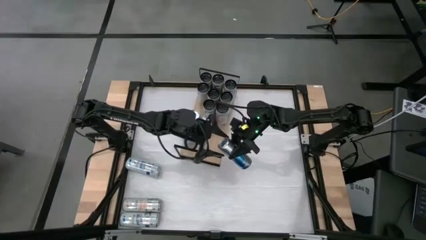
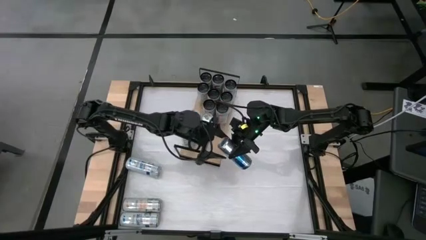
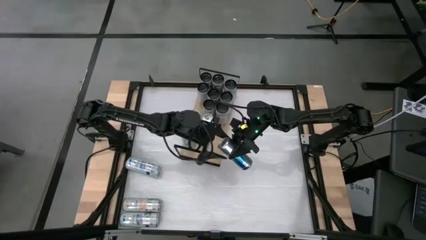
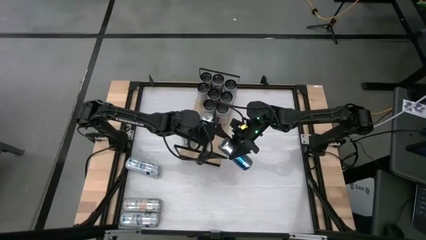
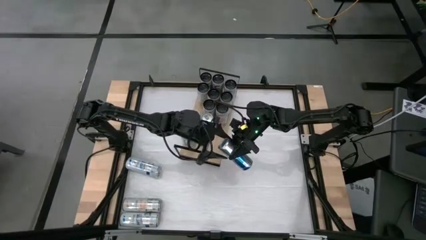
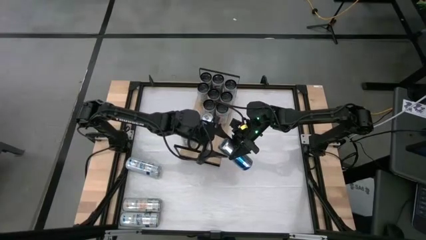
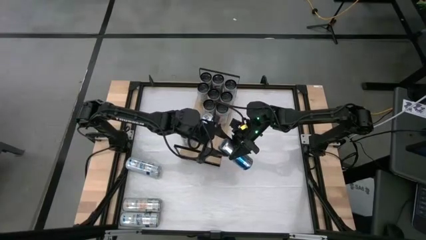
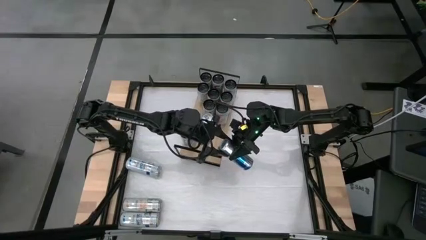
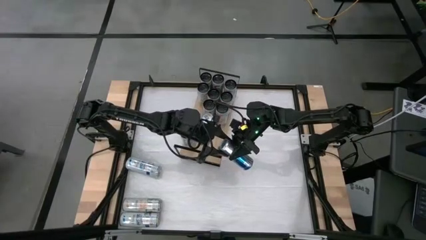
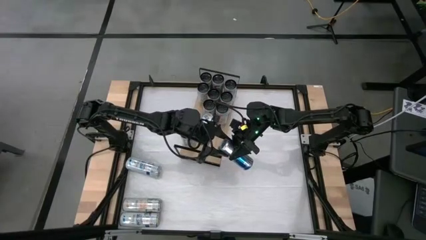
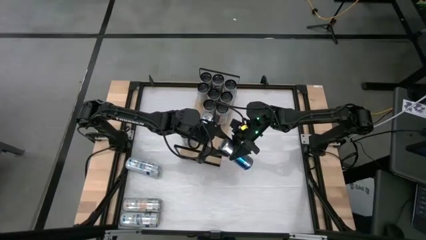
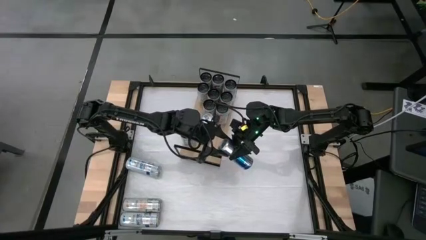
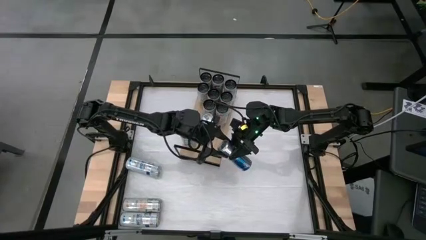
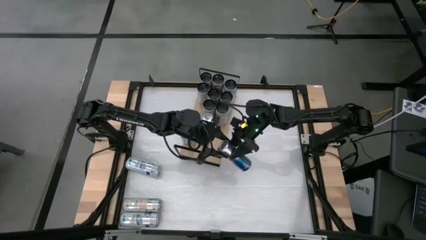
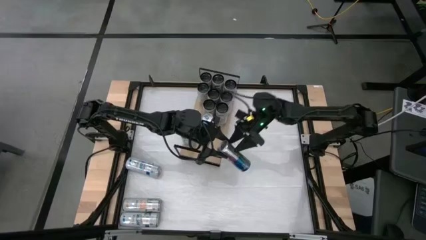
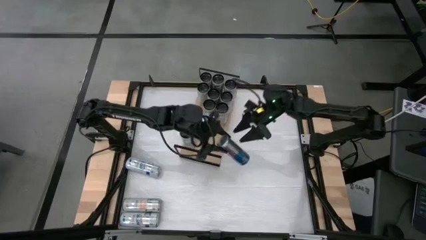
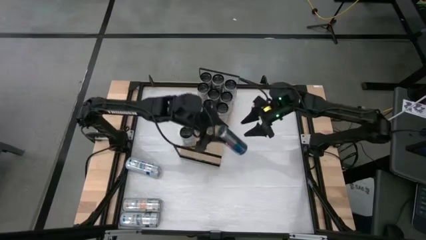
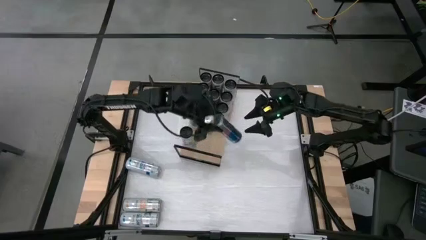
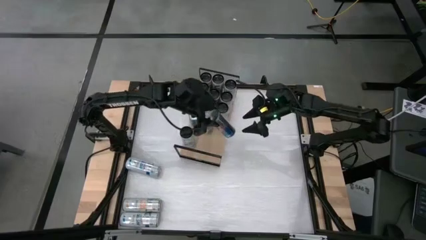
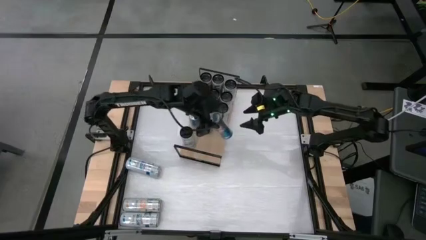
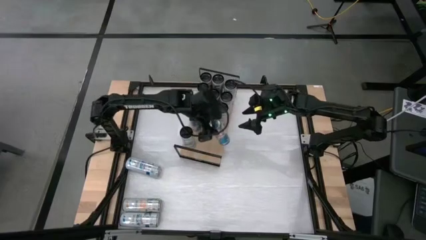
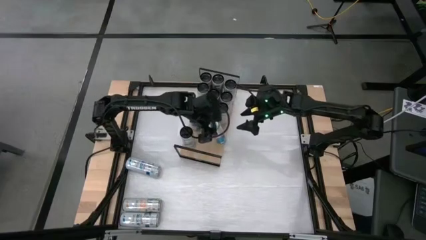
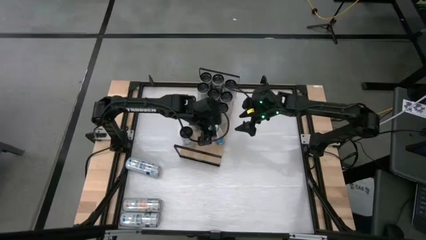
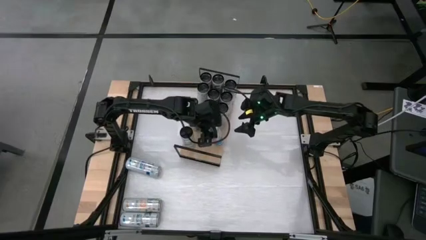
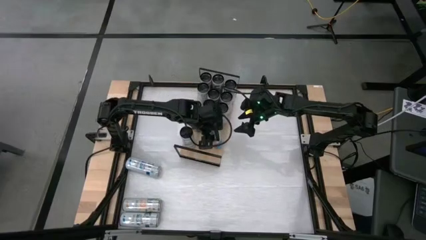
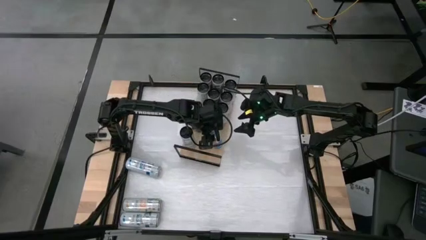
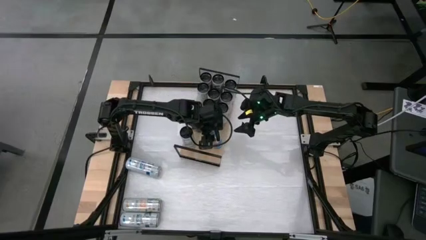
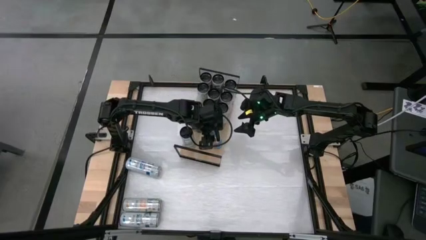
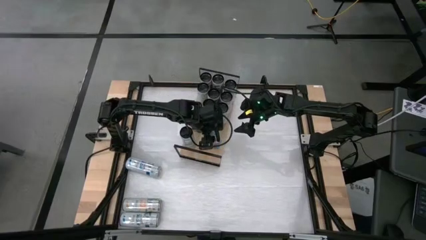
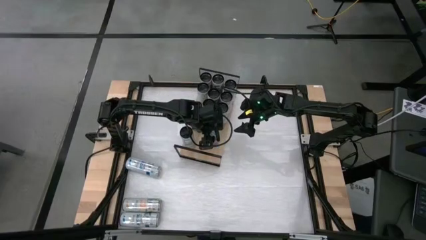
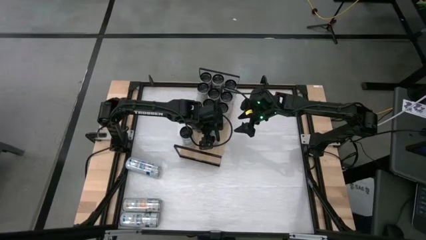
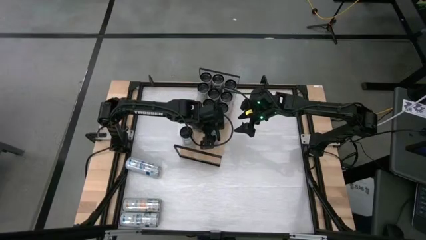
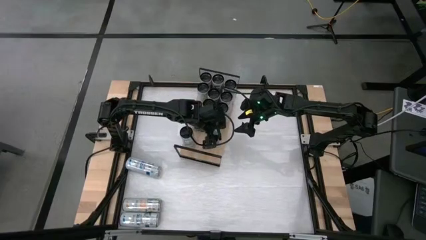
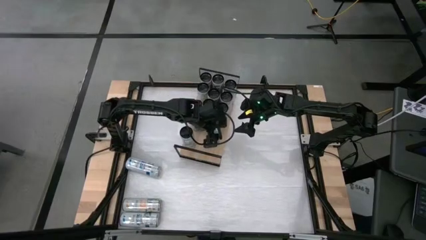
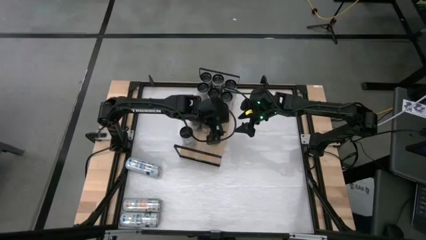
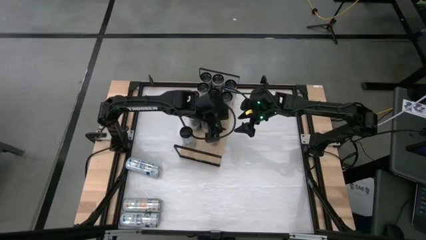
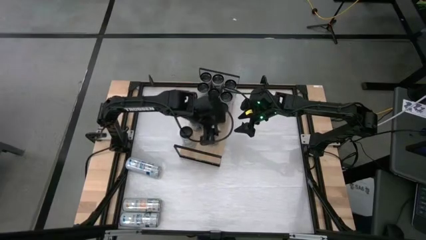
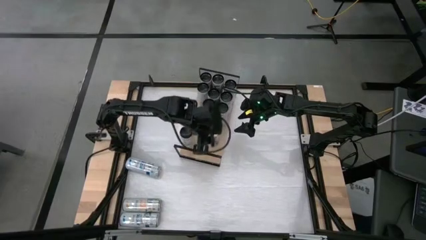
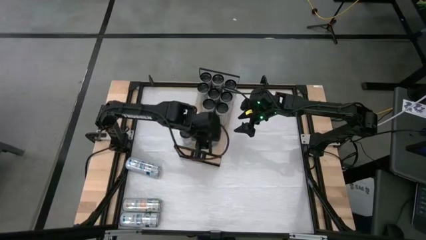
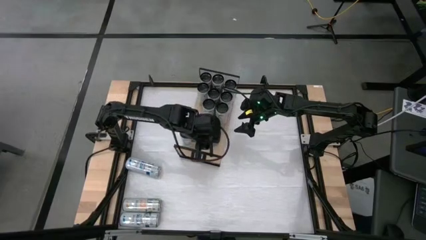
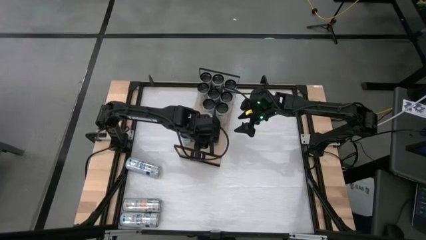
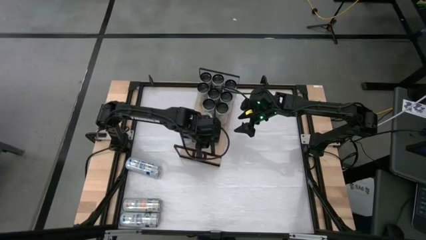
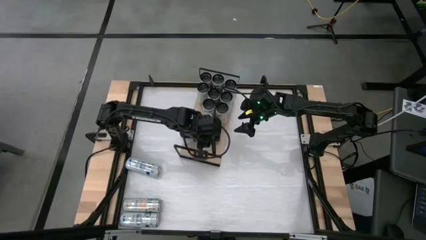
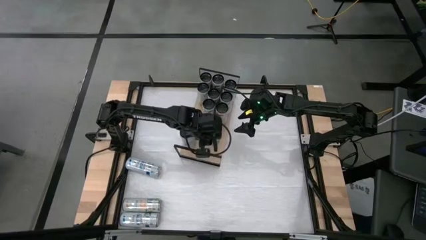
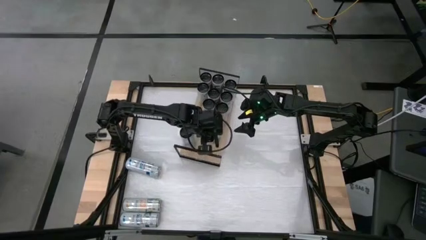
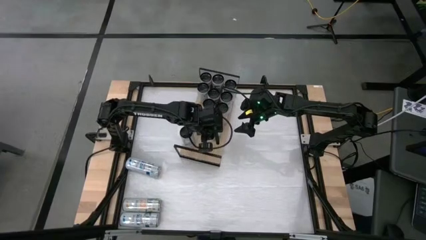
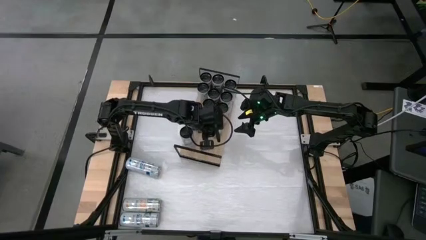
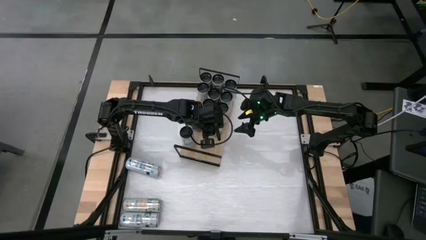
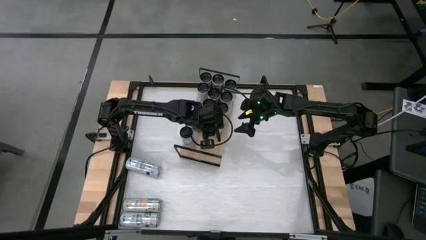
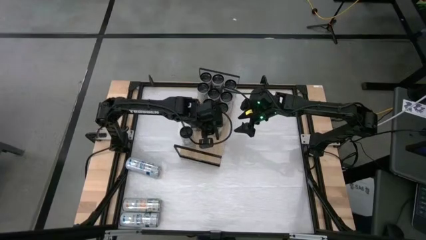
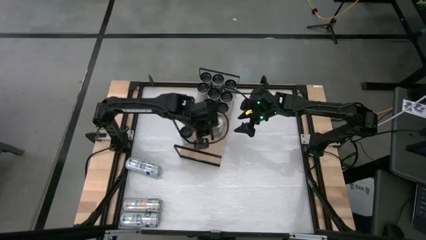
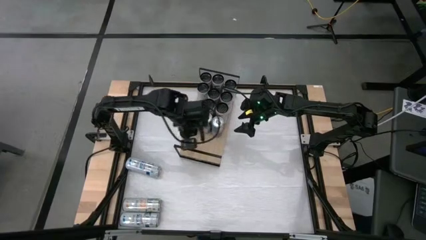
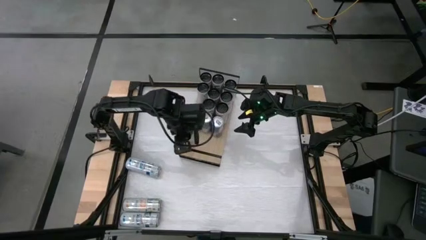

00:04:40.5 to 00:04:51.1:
Task: Place canned beverage on shelf
Put the bottom right silver soda can on the shelf aligned with the other silver soda can

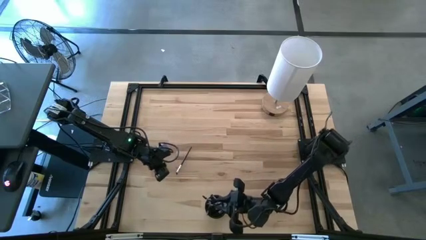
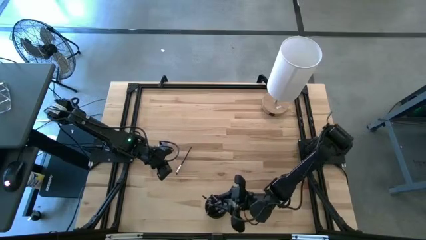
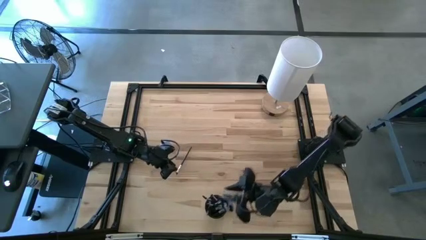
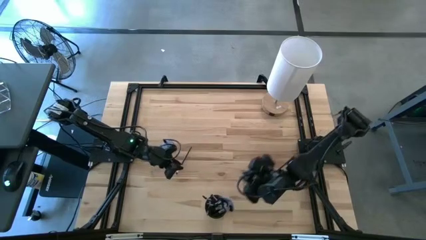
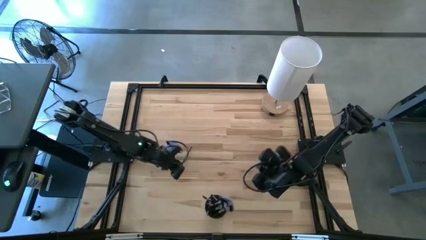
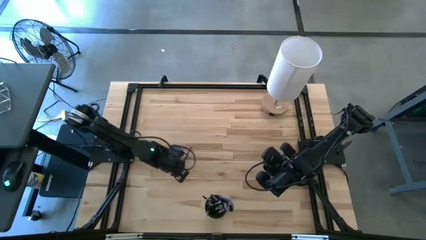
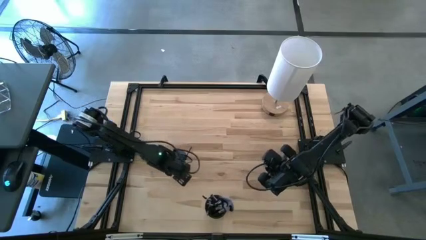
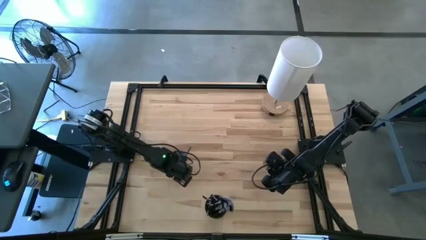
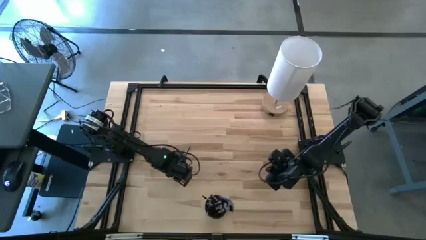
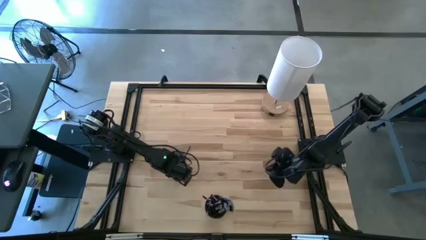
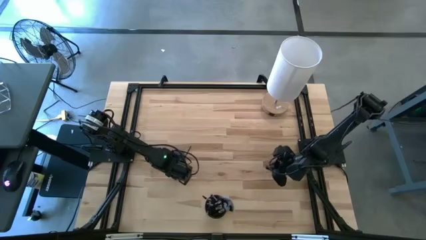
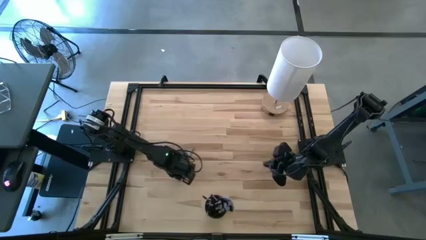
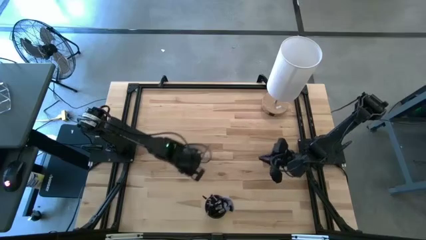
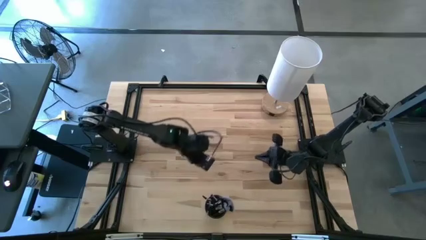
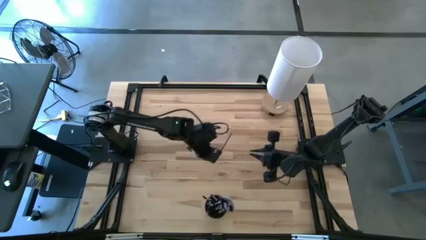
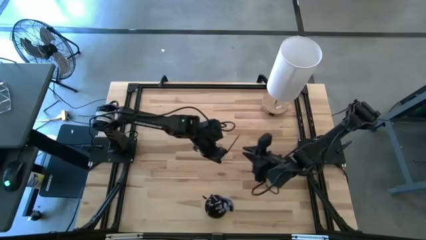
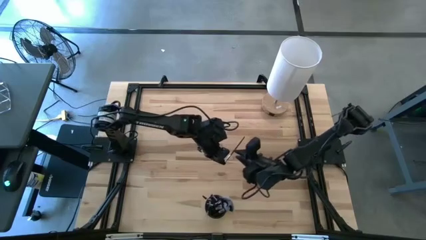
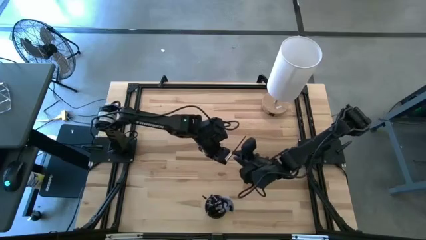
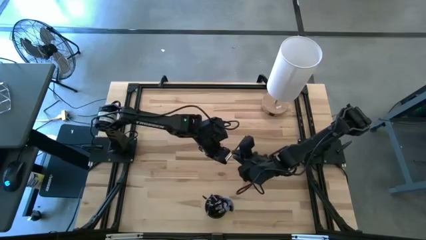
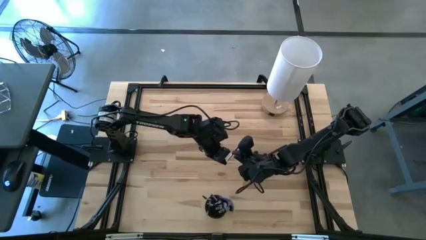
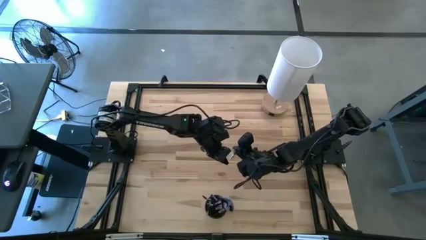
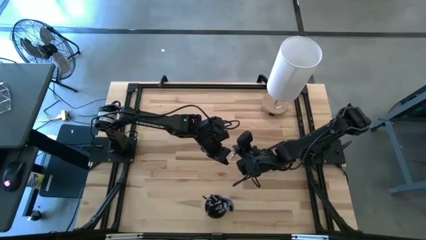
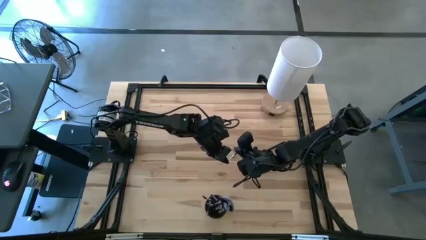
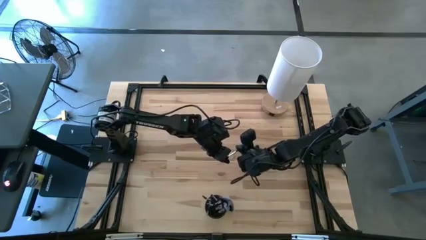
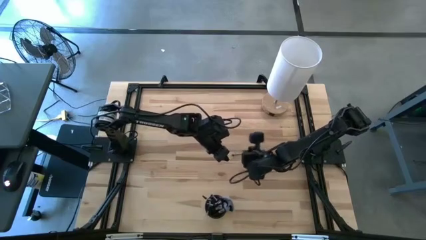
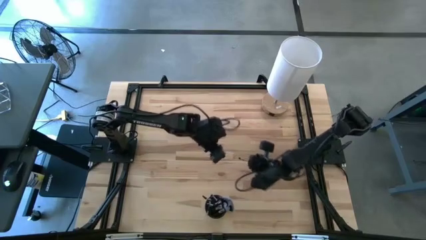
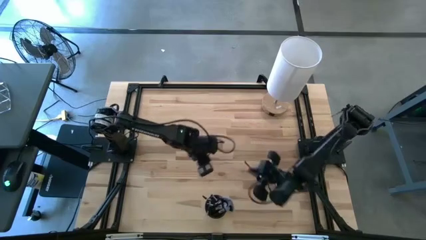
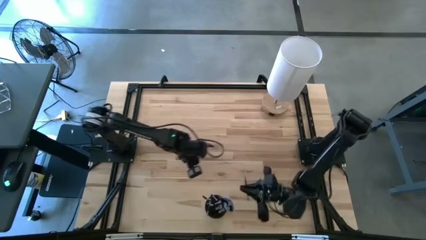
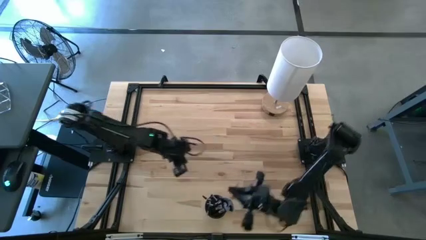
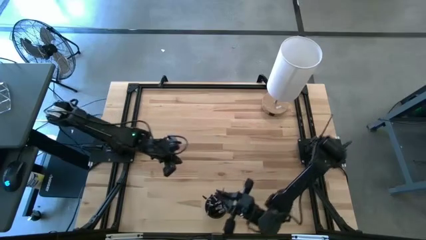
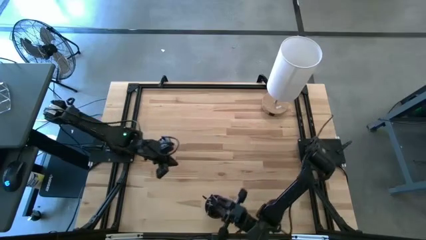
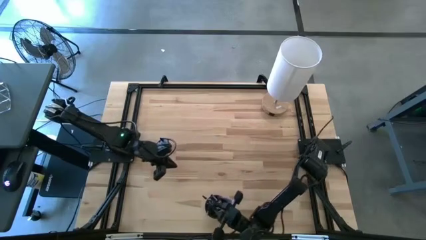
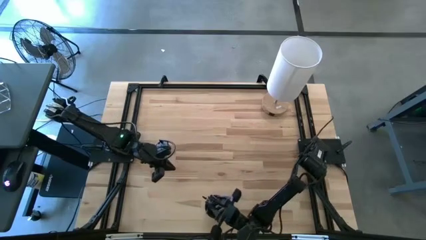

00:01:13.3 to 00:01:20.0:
Task: Put items in baskets/containers
Put the black eyeshadow brush into the black pen holder
